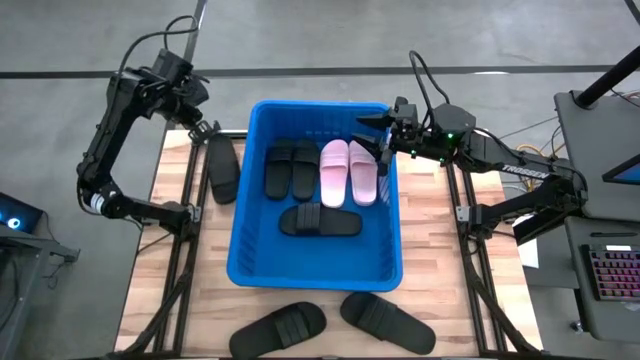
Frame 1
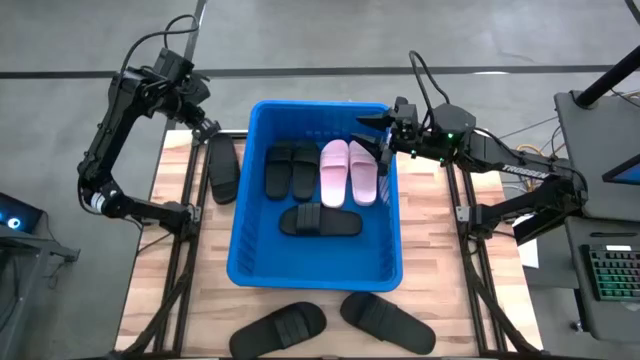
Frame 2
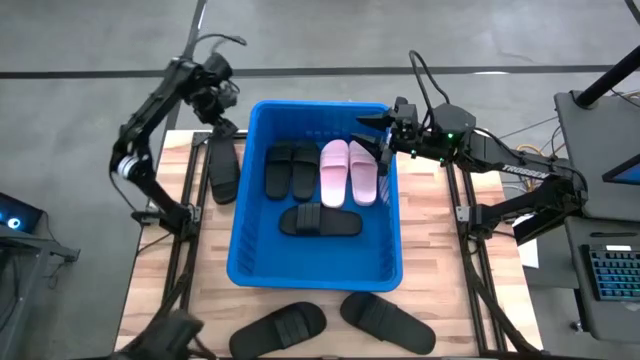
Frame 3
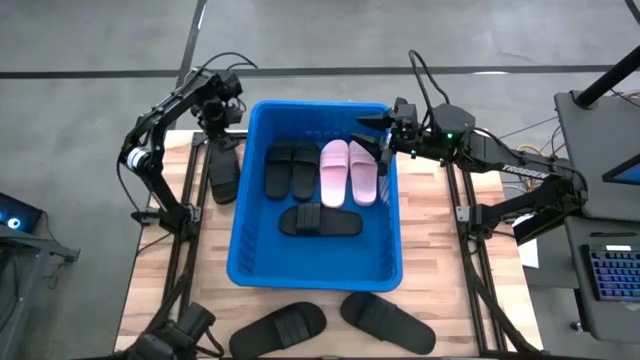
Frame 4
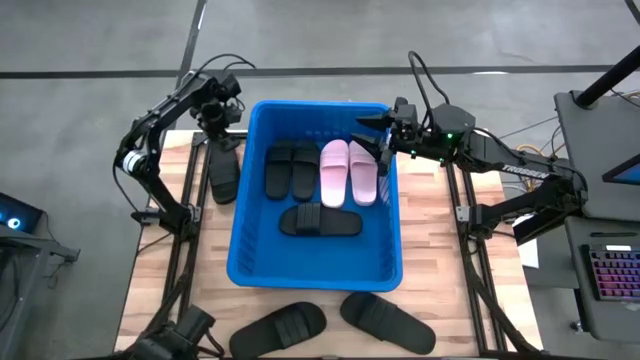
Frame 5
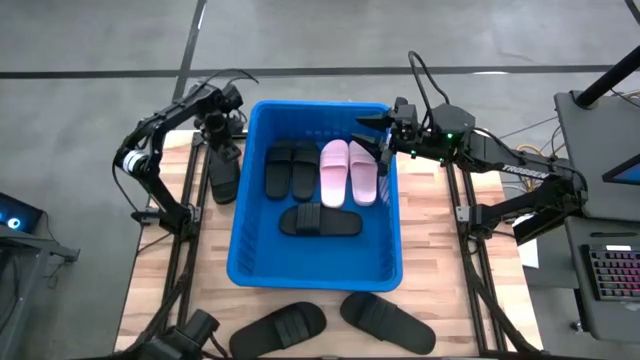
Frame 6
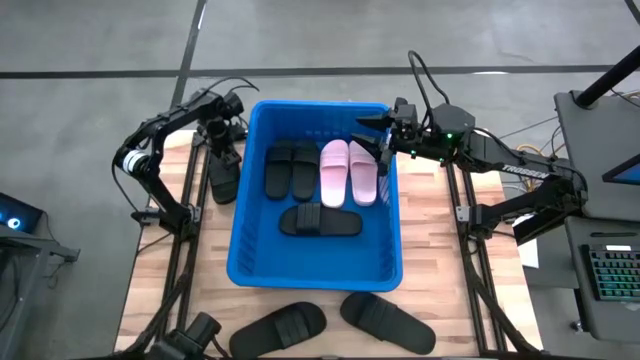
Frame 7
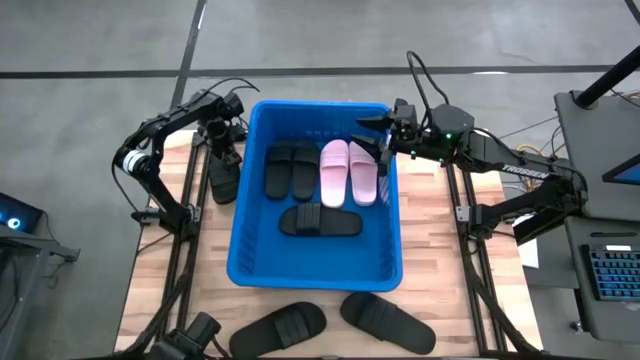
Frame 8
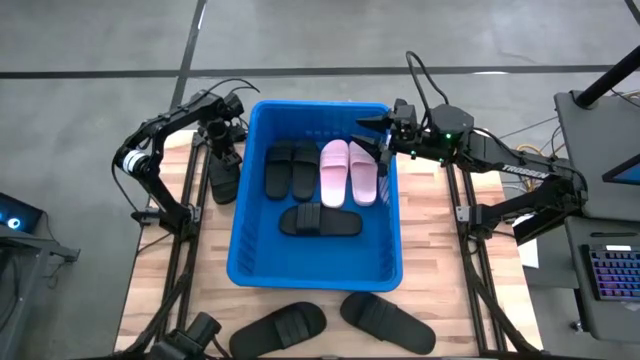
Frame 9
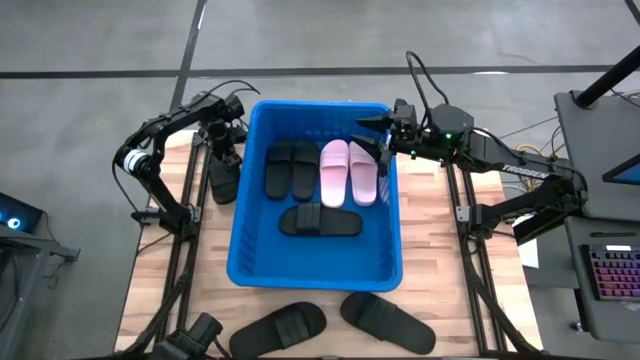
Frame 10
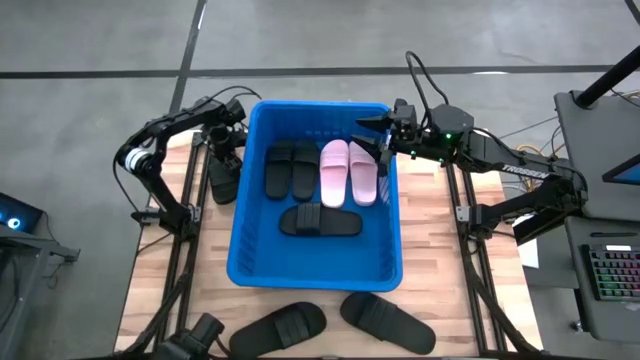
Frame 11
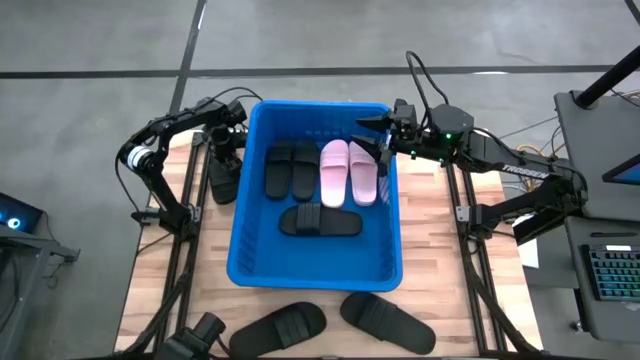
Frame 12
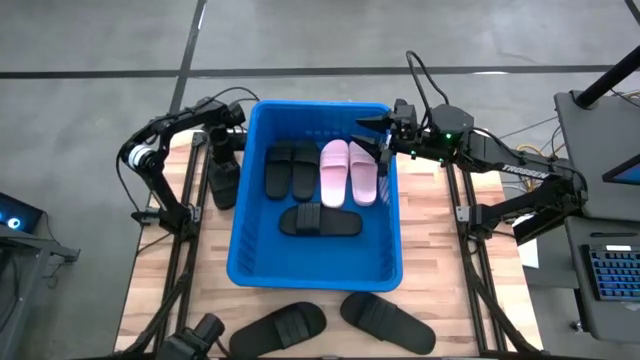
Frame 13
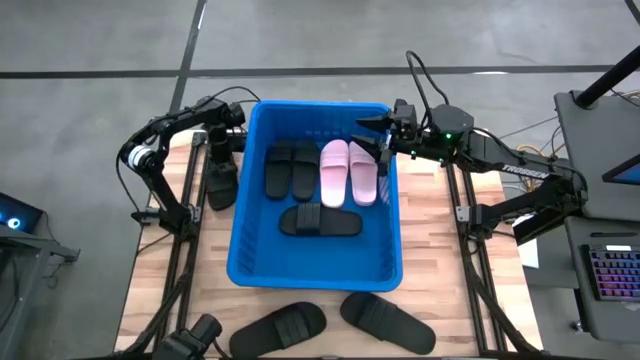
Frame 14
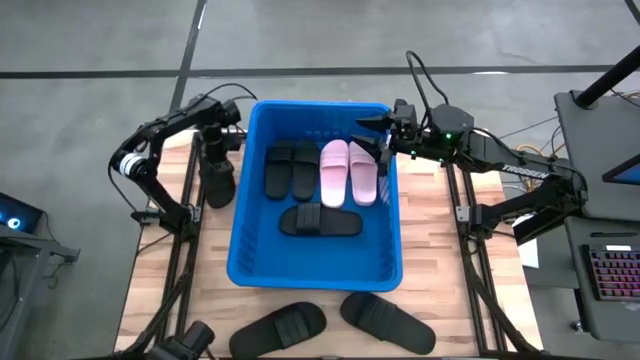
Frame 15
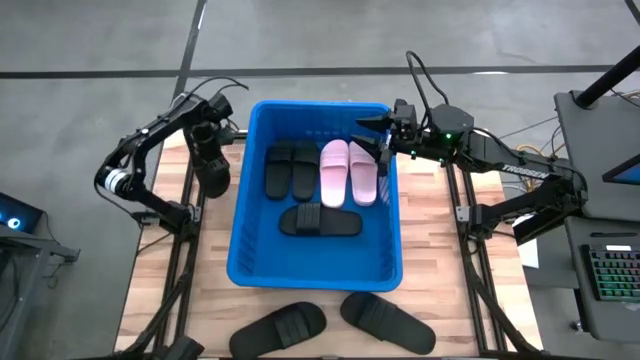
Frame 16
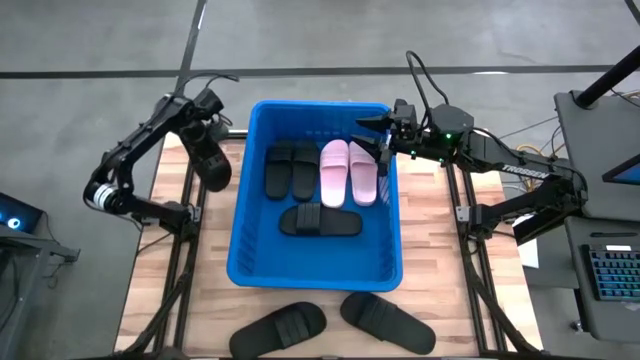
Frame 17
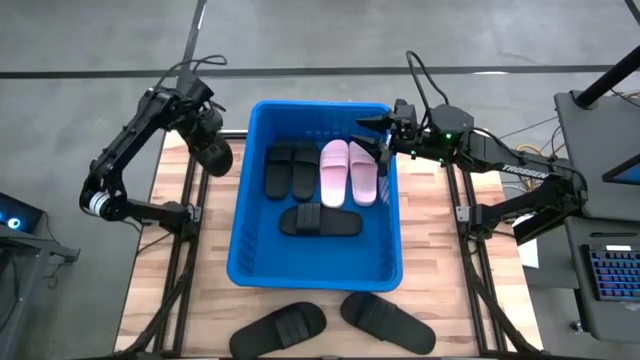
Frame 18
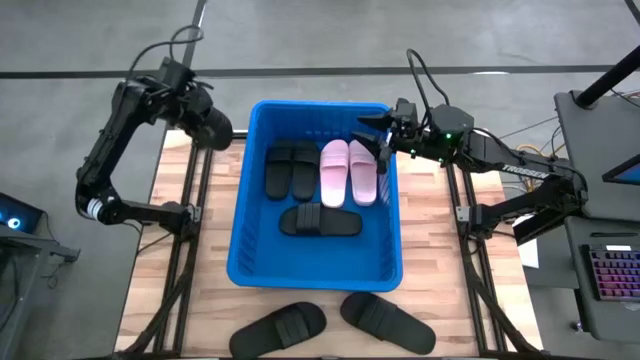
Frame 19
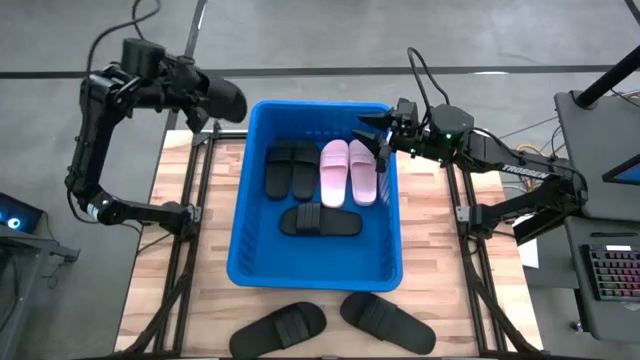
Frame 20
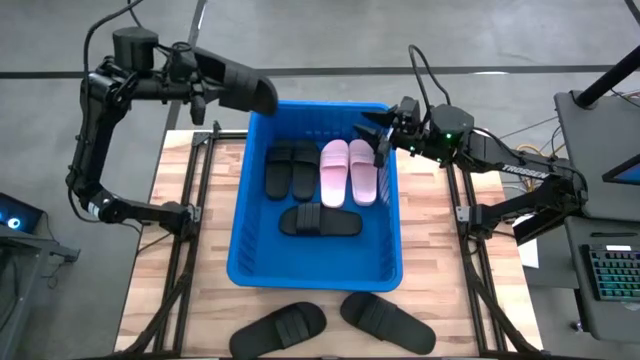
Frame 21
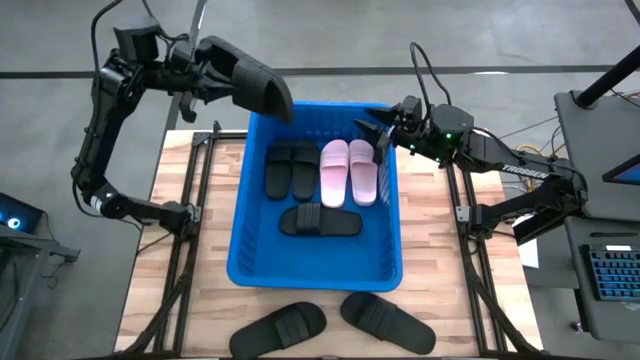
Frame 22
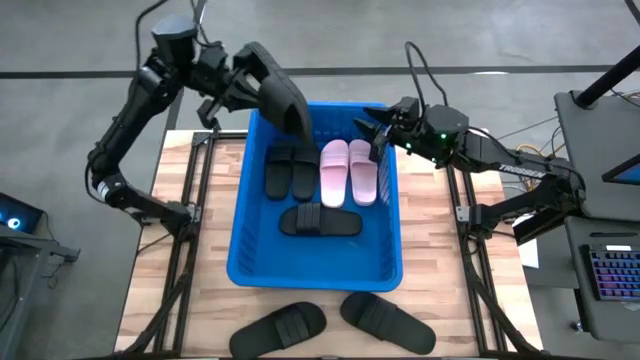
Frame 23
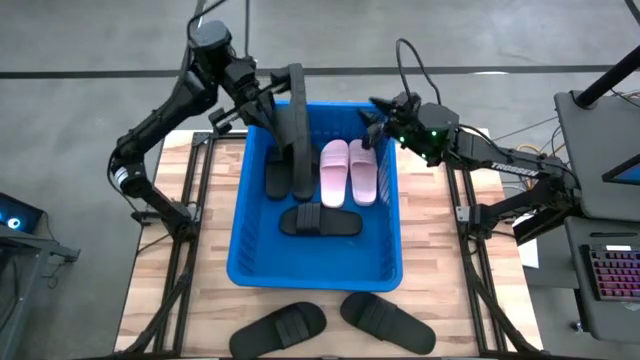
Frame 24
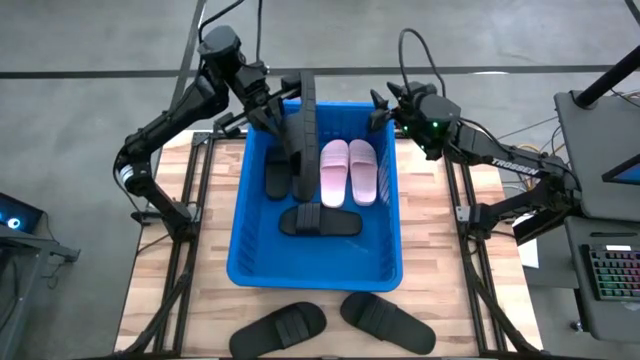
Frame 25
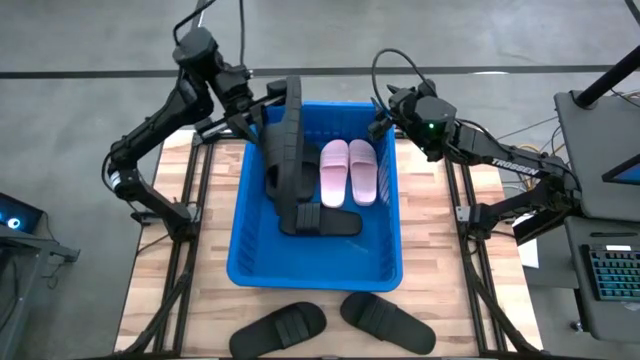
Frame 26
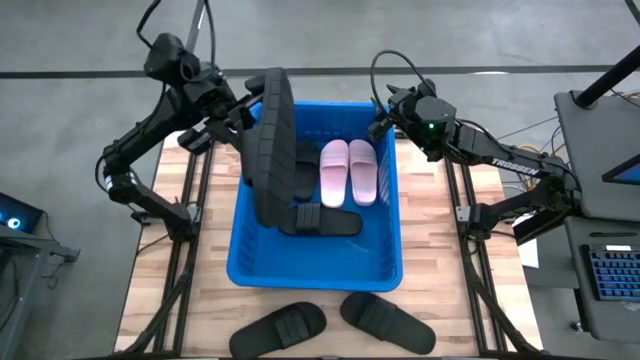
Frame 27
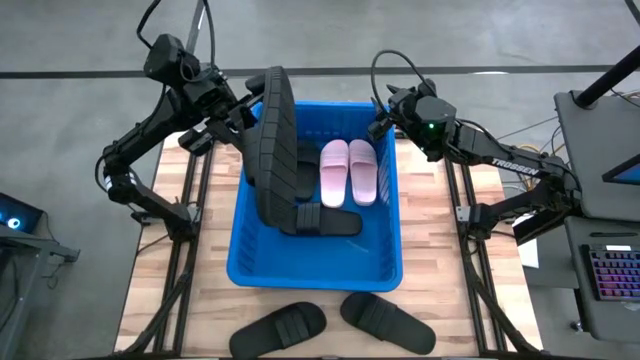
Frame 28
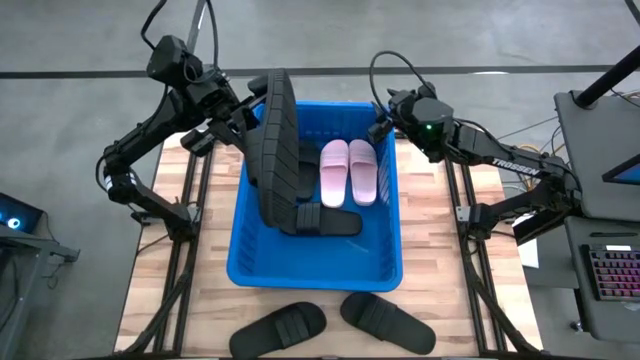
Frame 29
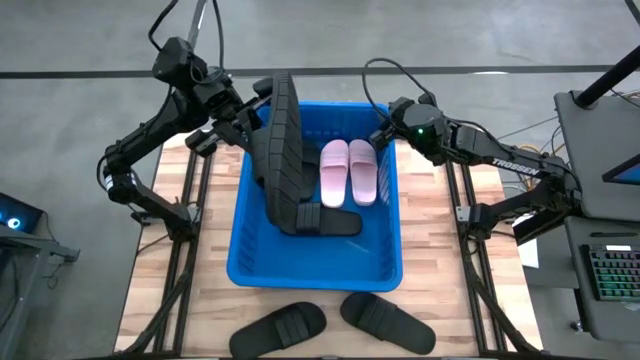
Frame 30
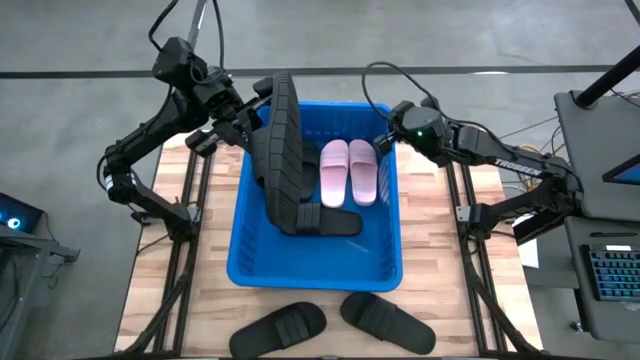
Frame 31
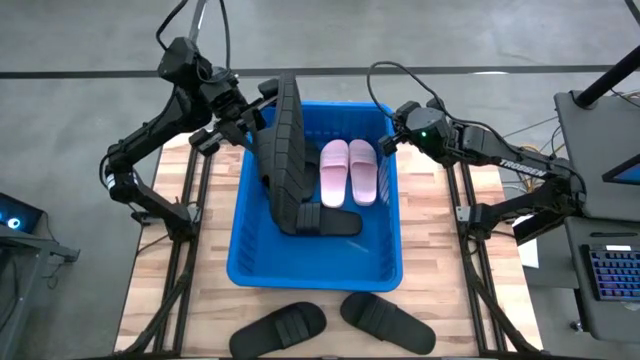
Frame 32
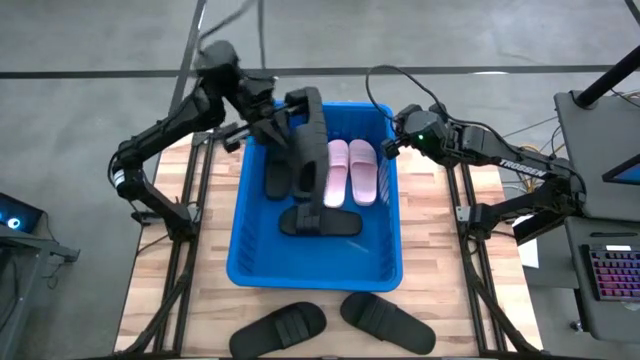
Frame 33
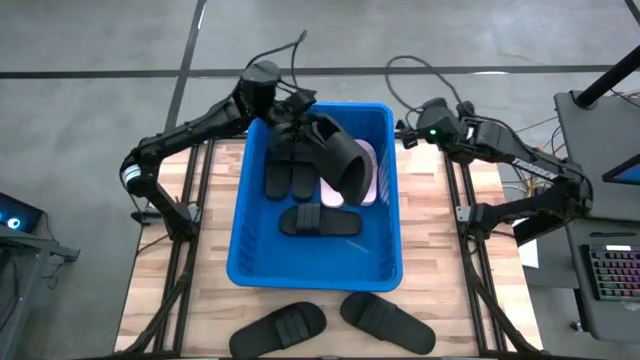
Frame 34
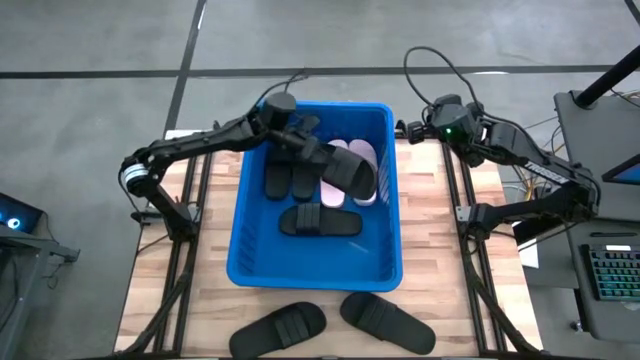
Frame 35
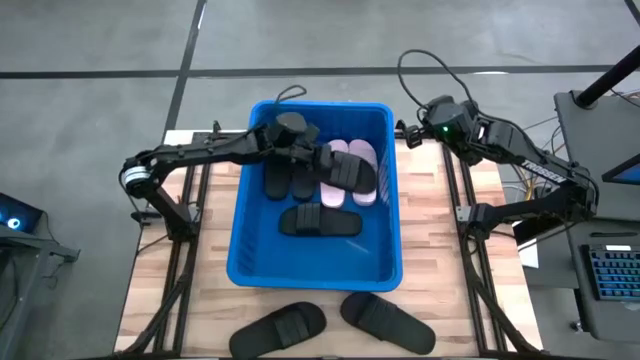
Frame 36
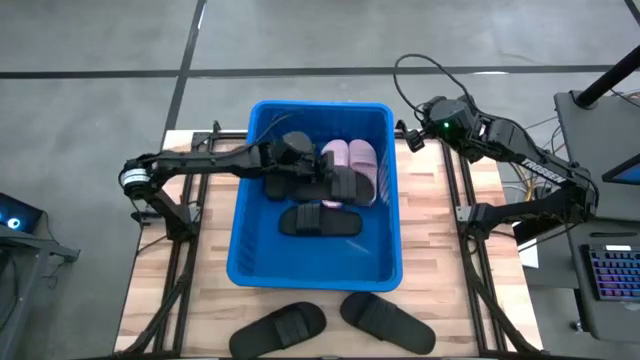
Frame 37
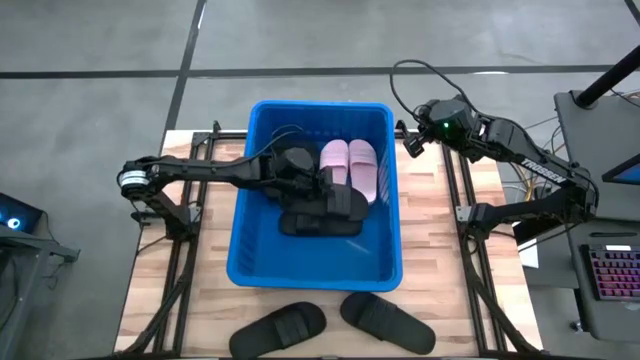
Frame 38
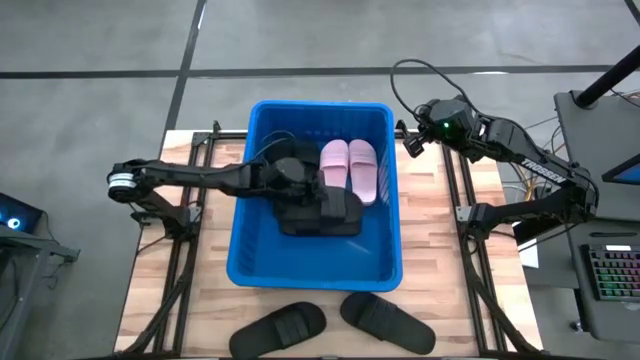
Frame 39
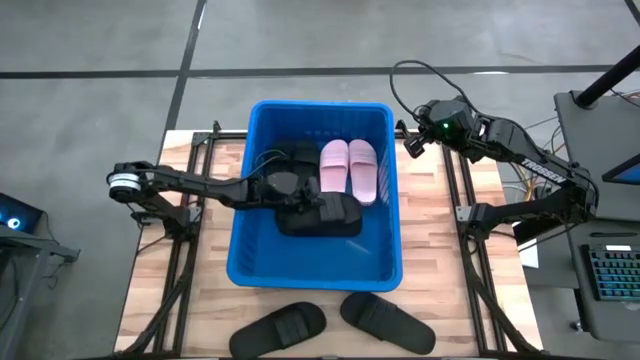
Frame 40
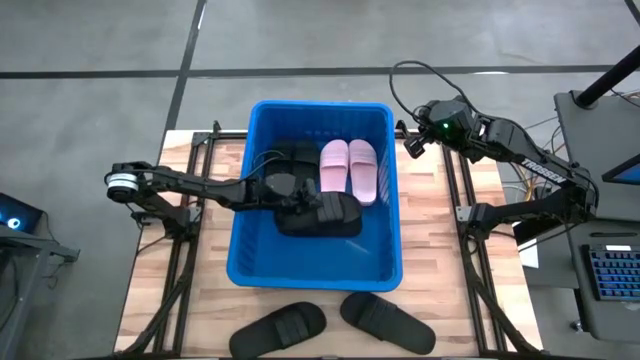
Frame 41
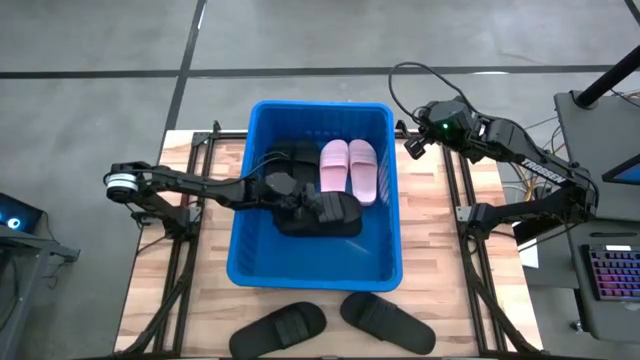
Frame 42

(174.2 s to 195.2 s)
Task: Pick and place slides into bin
Put the black slide into the blue bin

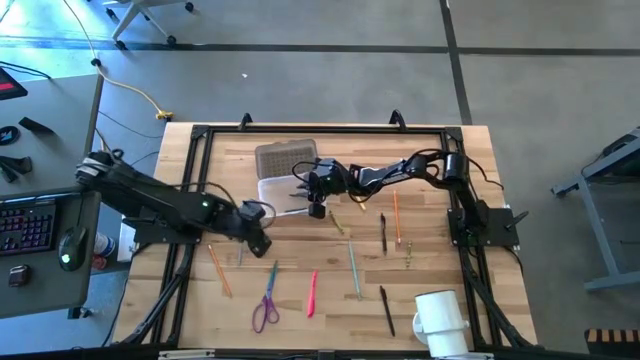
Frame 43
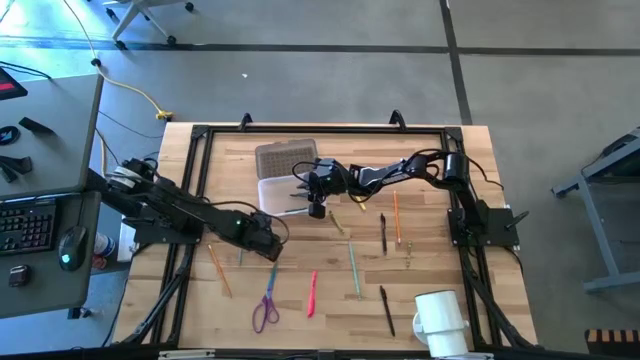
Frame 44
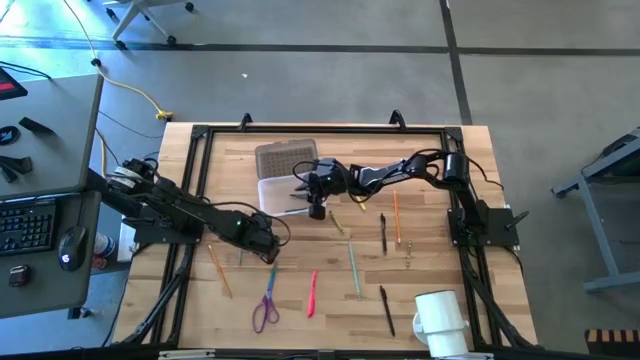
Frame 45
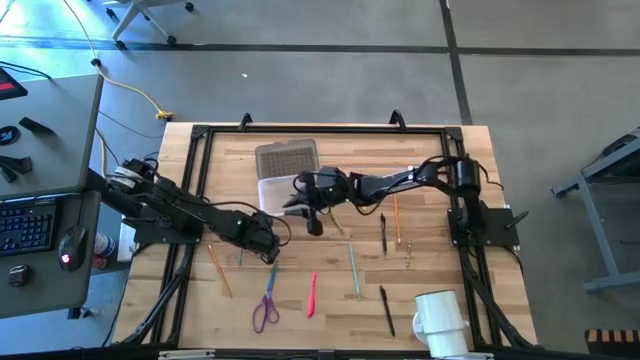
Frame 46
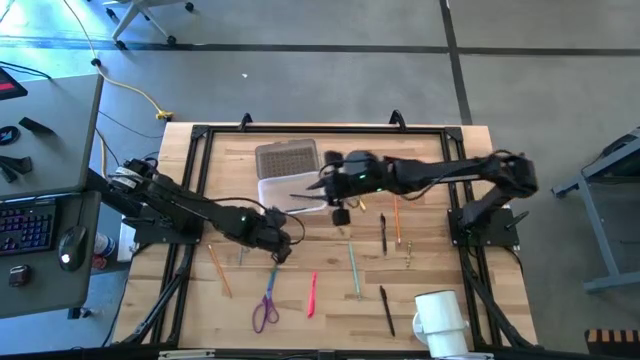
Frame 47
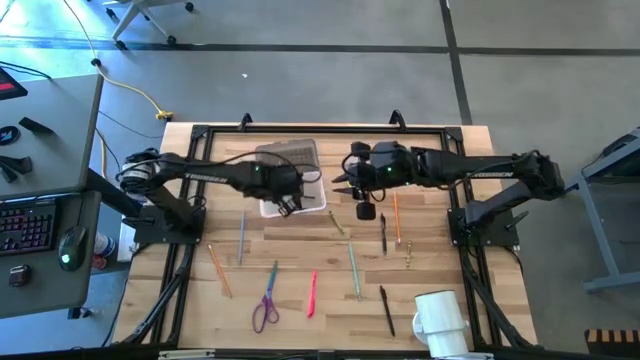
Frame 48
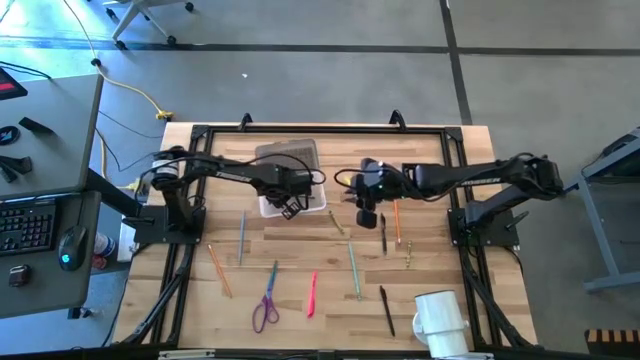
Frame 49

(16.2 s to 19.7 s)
Task: Pick & place school supplies into a supply box
Put the green crayon into the transparent supply box
